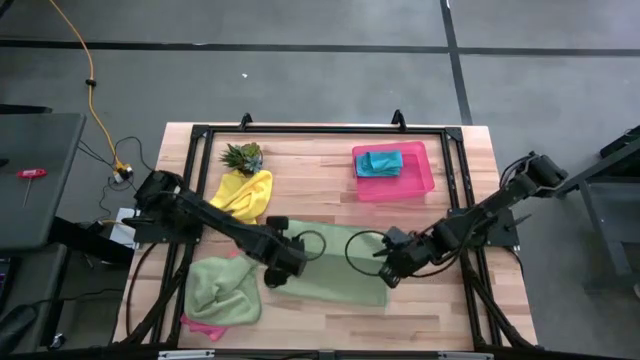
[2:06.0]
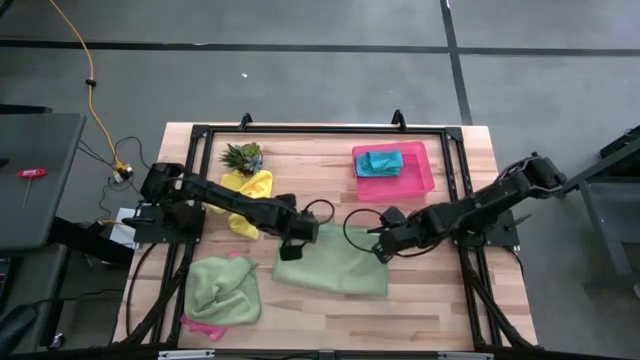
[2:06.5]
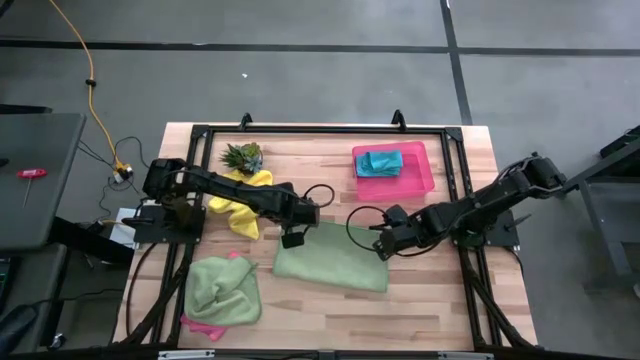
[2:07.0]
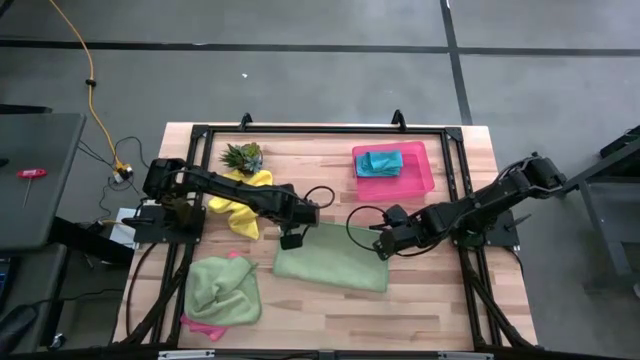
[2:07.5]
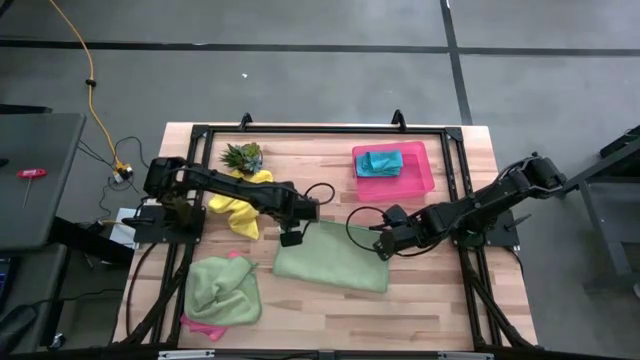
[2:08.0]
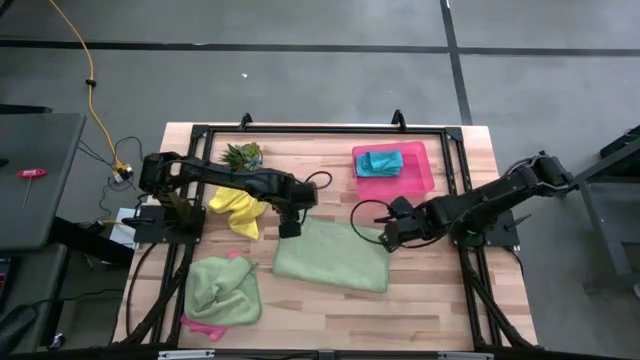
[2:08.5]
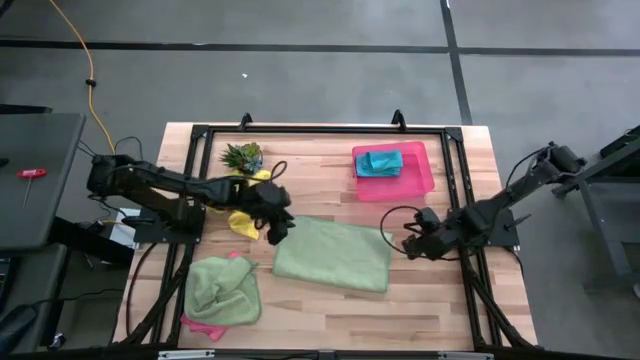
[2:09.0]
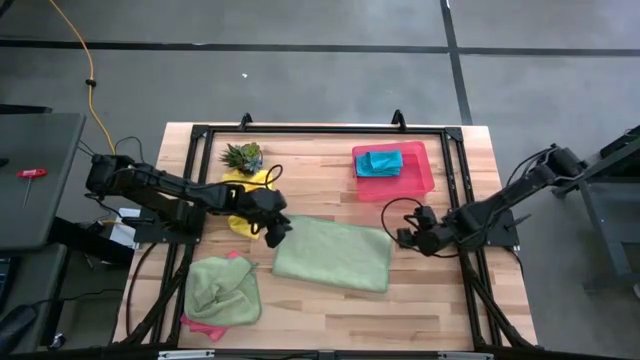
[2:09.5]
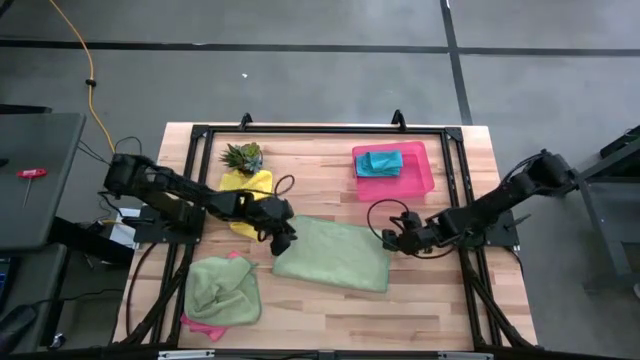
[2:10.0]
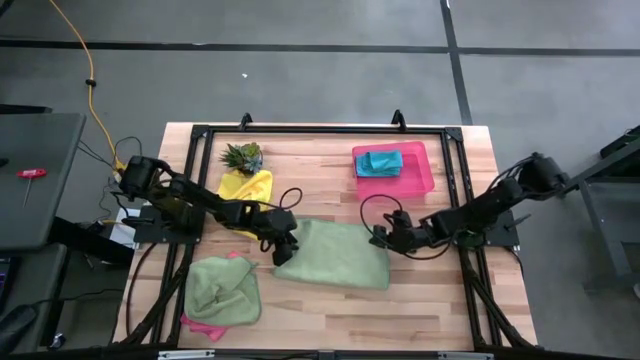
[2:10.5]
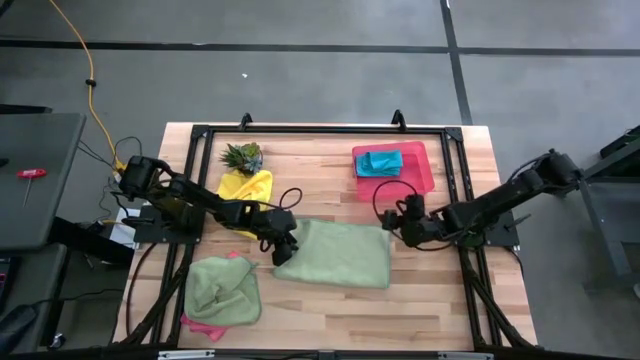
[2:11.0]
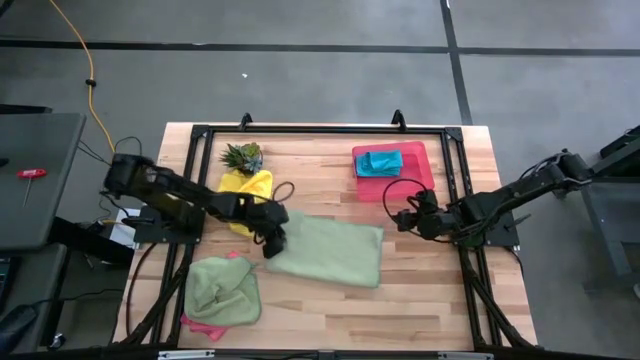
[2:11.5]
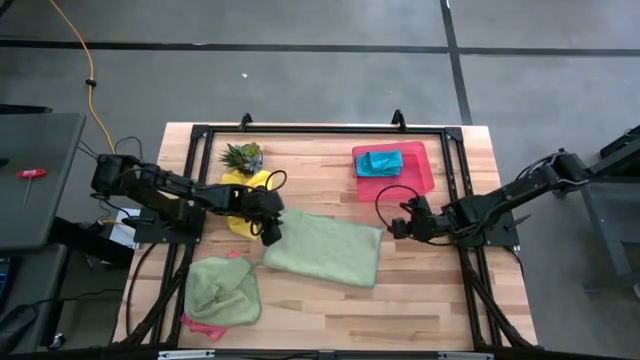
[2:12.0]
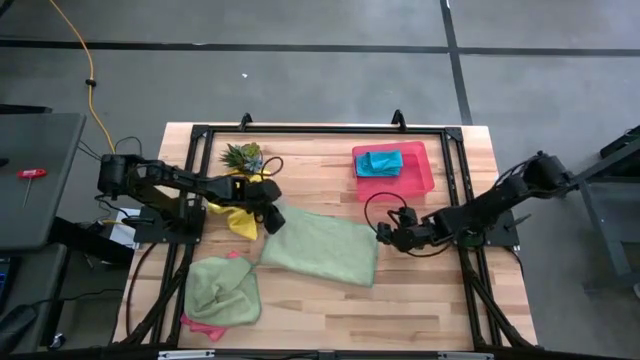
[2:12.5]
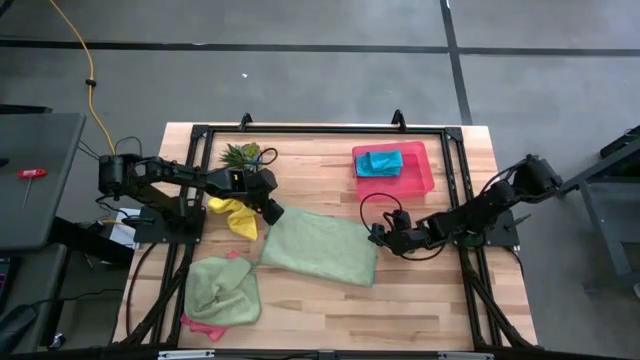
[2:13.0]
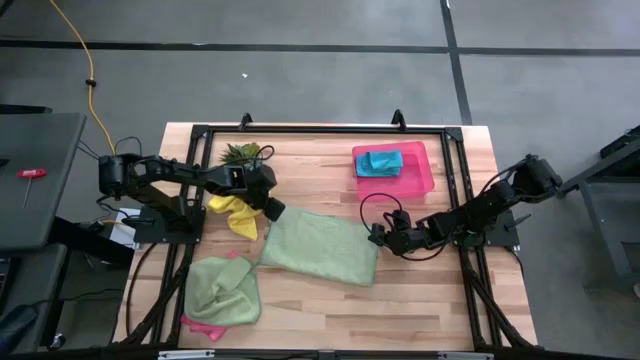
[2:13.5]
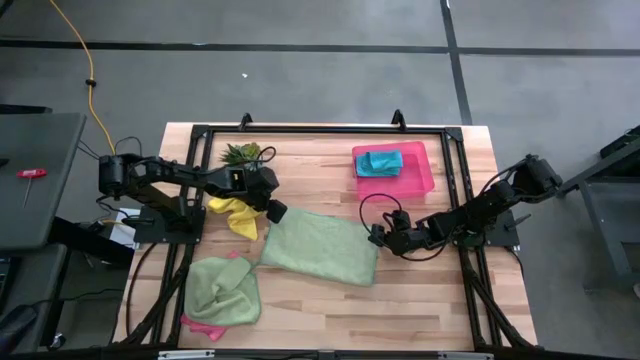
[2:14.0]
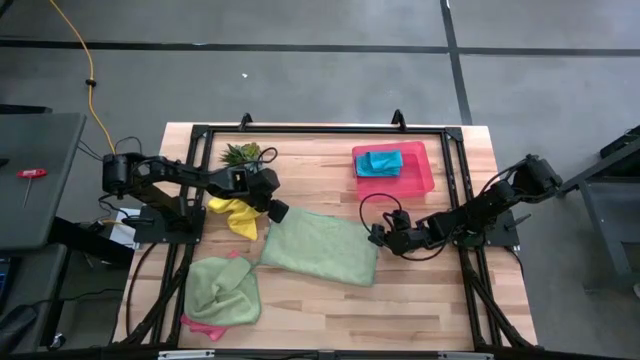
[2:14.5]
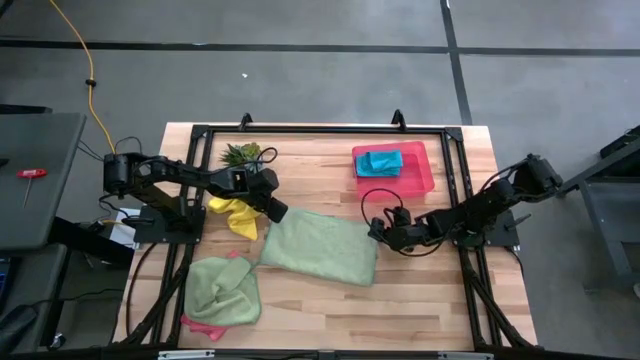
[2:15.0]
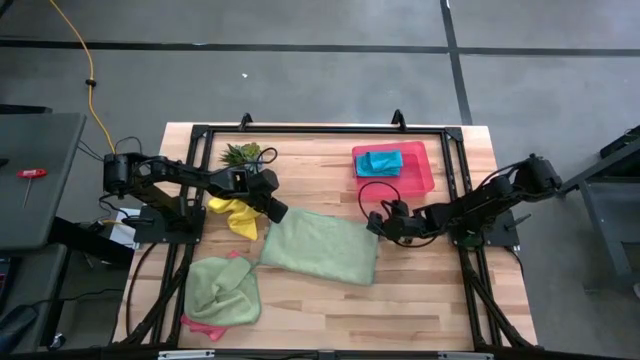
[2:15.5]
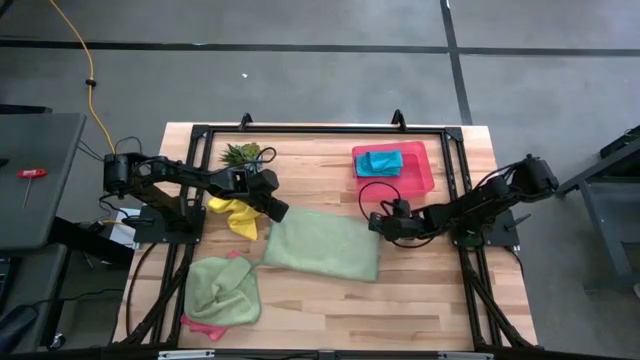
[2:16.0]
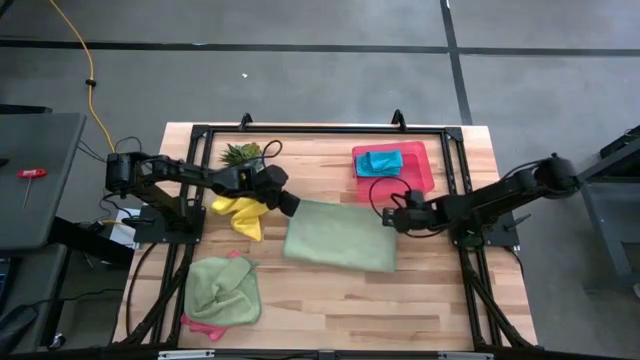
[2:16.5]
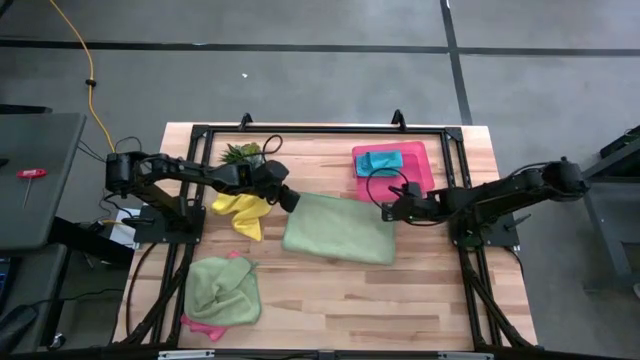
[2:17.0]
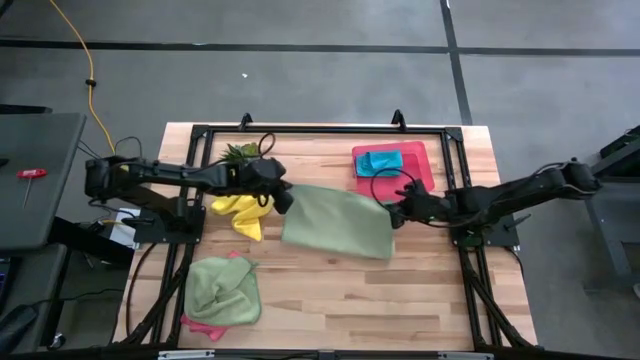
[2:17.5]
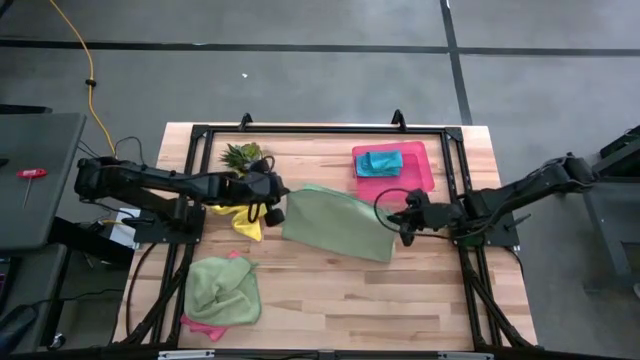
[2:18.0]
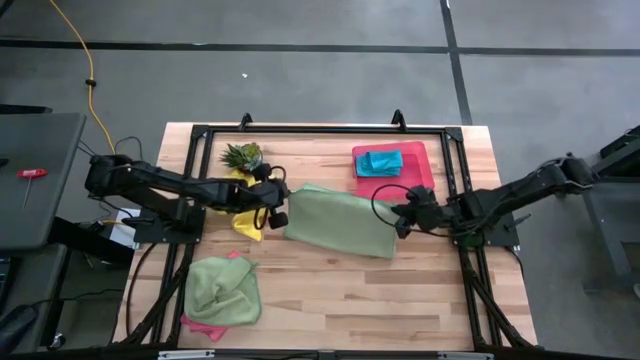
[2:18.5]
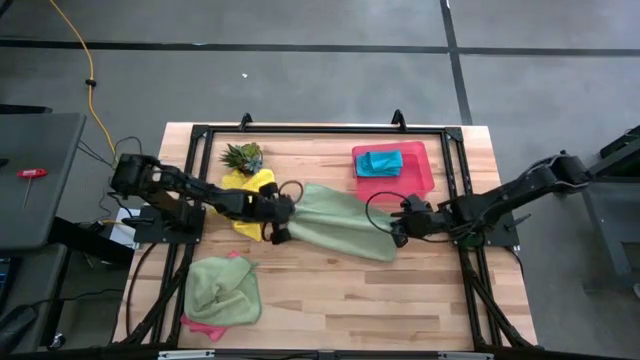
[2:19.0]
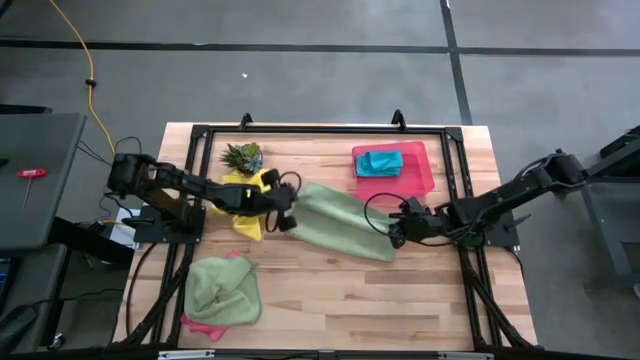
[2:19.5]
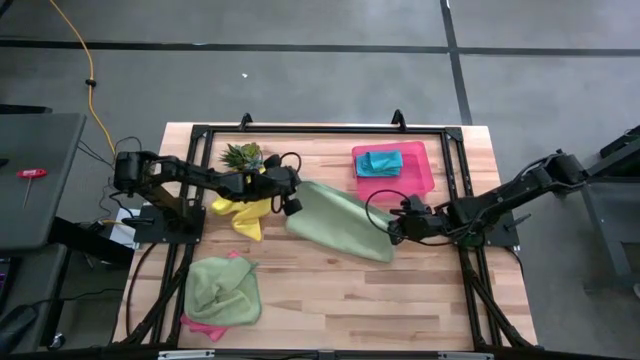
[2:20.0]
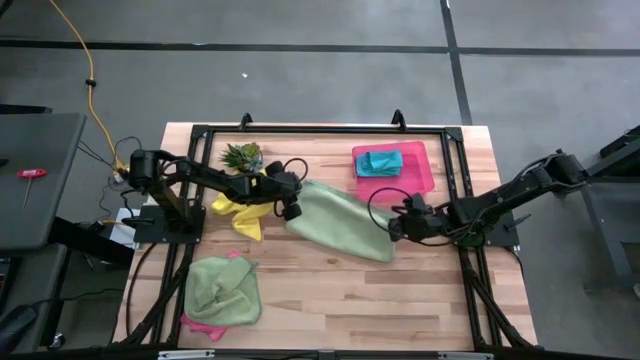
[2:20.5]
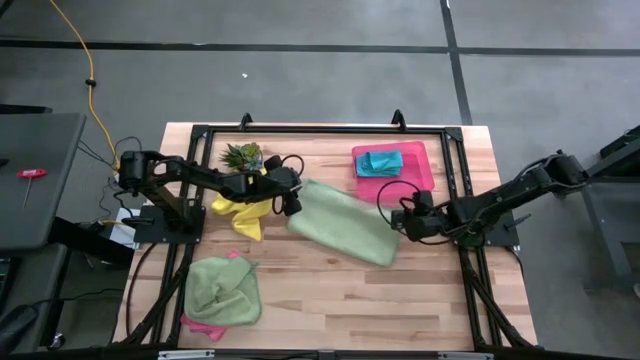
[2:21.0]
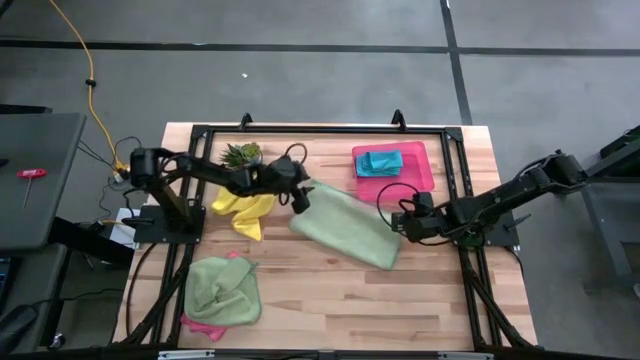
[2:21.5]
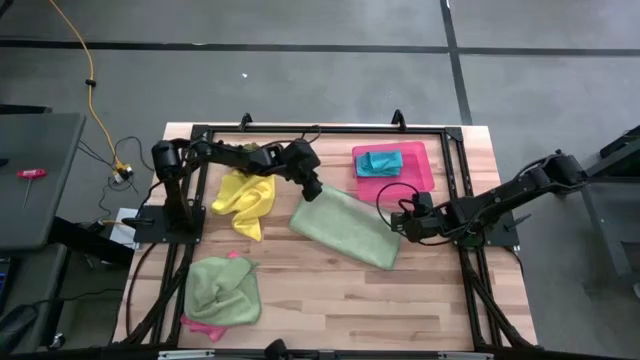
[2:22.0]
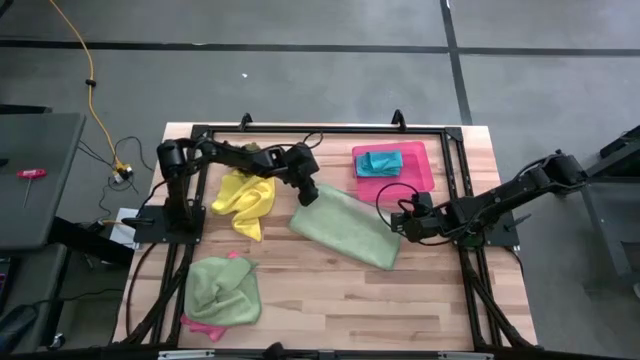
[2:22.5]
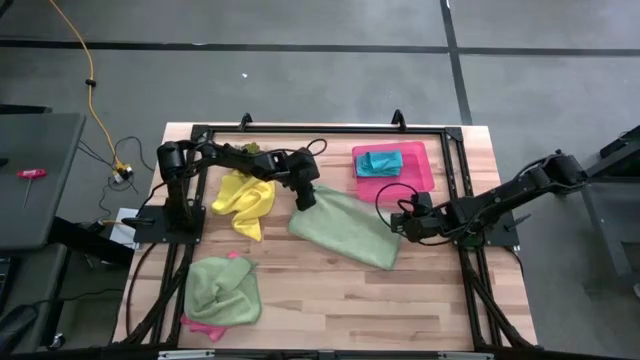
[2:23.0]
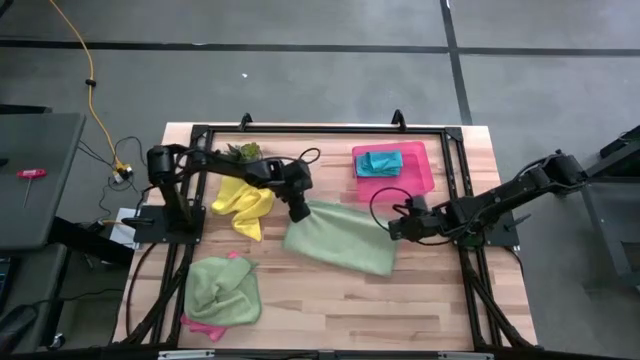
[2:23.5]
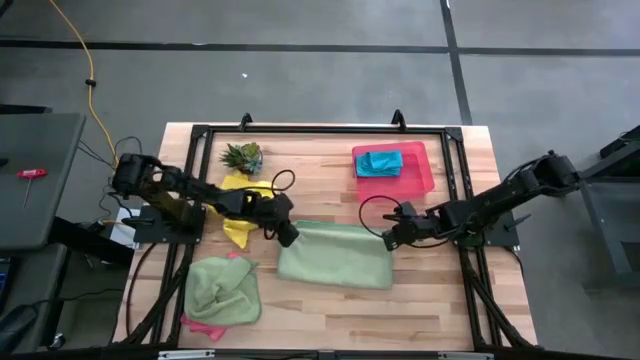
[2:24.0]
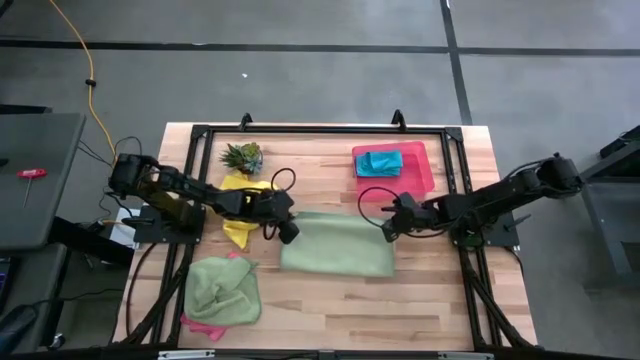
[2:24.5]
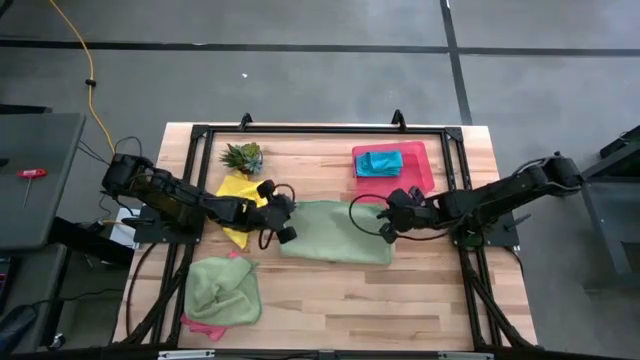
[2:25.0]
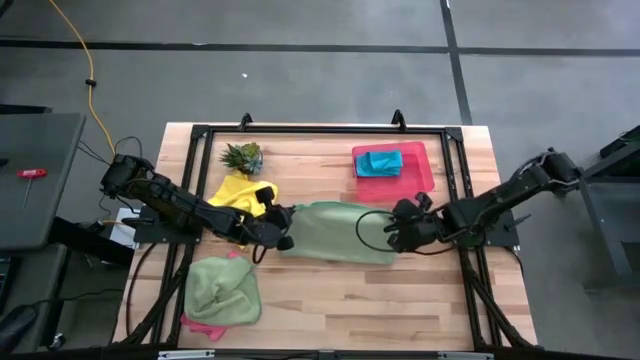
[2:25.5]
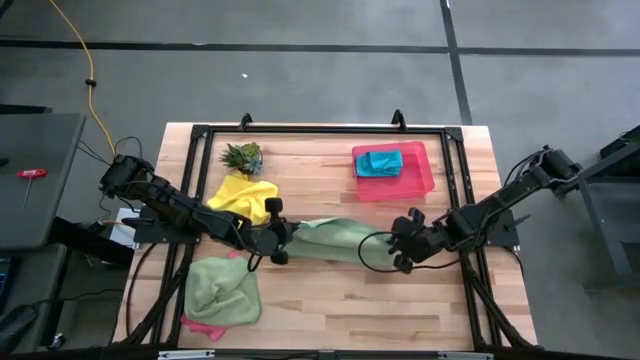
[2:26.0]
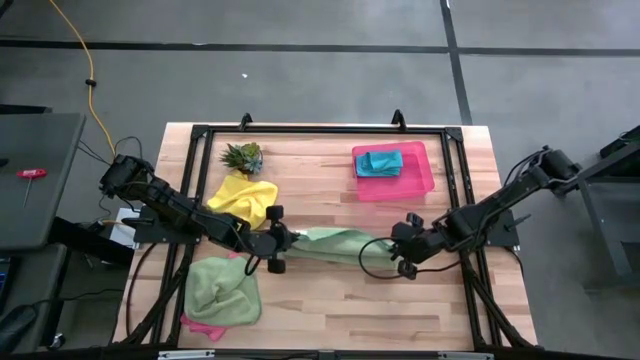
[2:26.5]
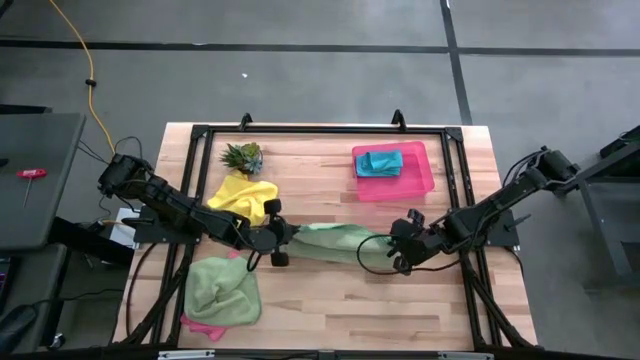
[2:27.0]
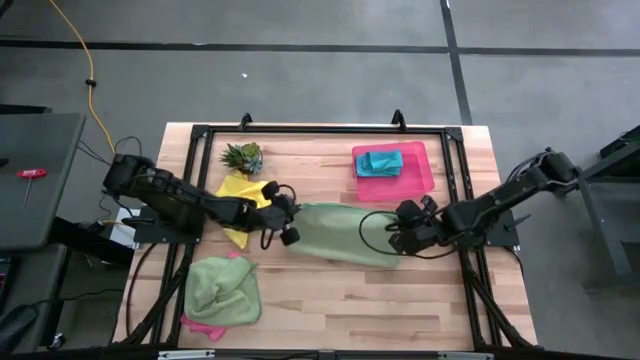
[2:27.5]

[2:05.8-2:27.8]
Task: Fold microfiber towels
Fold the right green microfiber cloth
